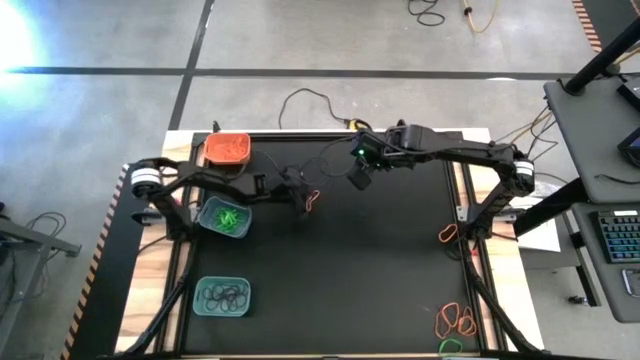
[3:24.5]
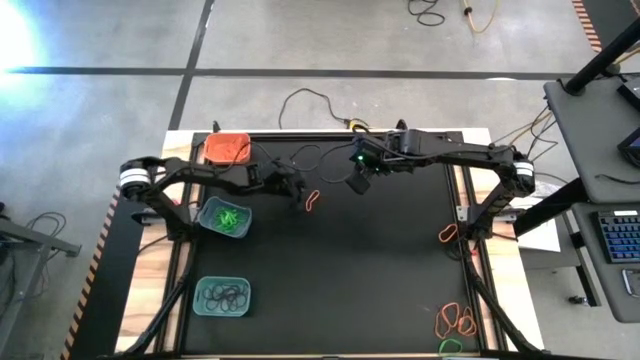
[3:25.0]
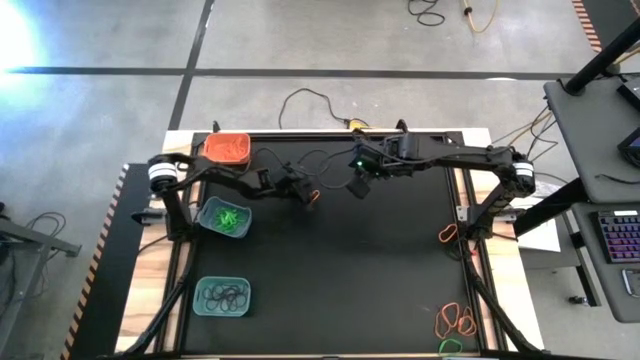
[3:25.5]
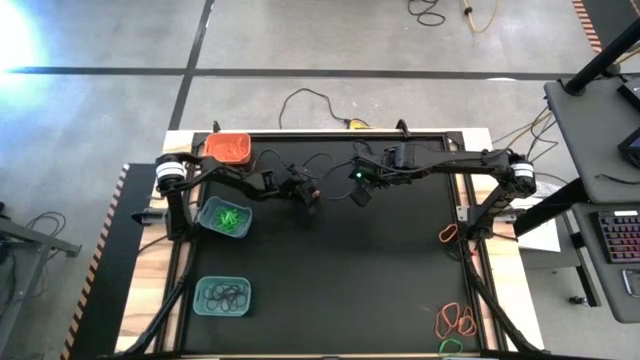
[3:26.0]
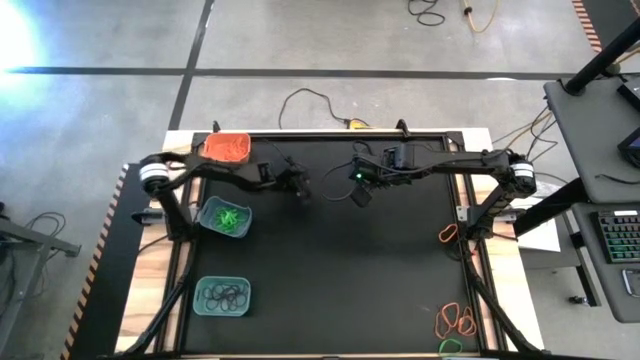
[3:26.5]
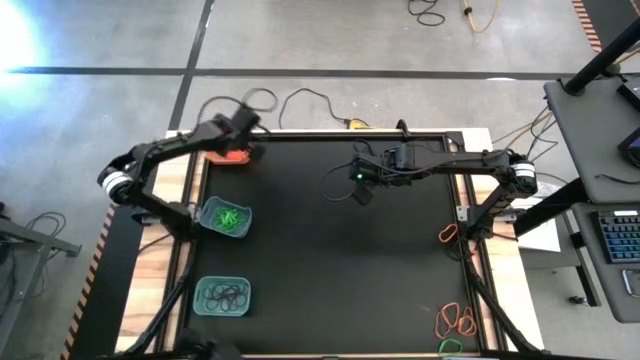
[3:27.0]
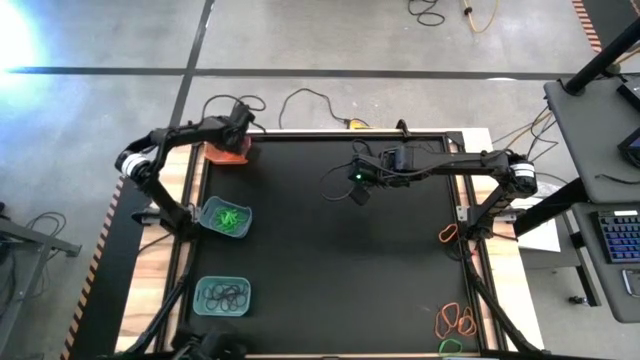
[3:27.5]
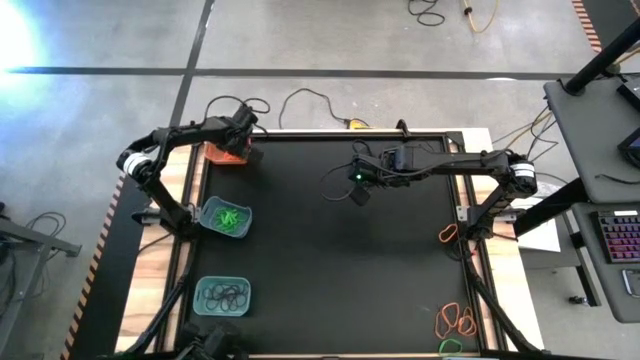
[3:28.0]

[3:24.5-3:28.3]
Task: Sort rubber bands into baskets
Put the orange rubber band into the orange bin

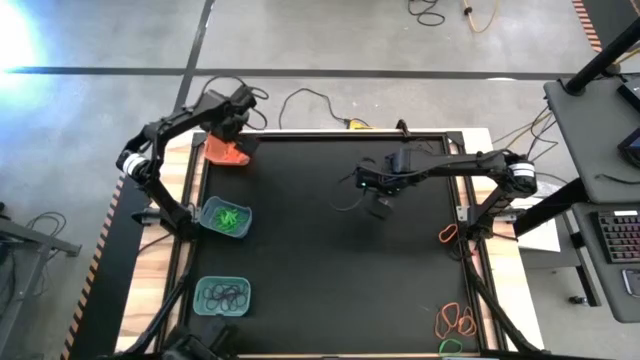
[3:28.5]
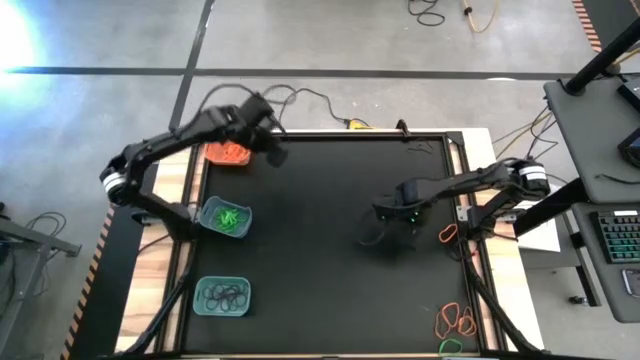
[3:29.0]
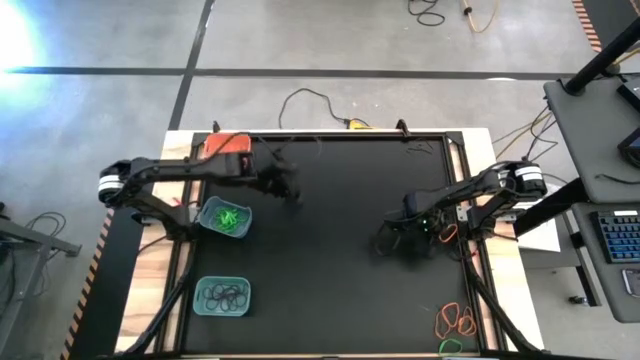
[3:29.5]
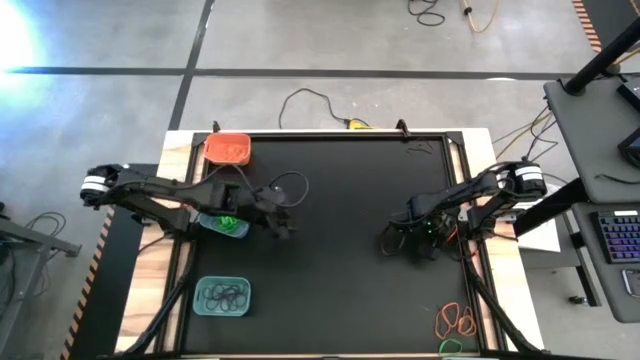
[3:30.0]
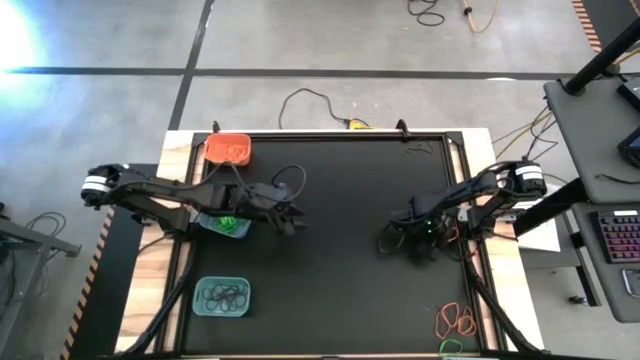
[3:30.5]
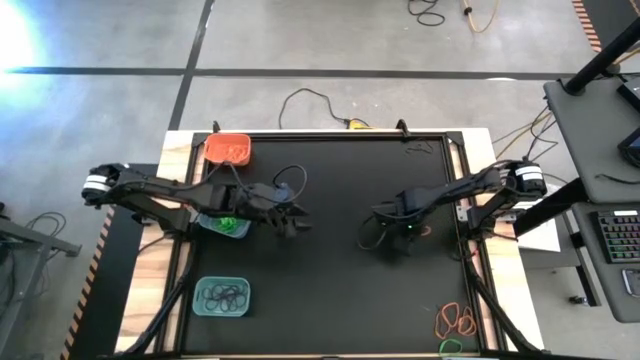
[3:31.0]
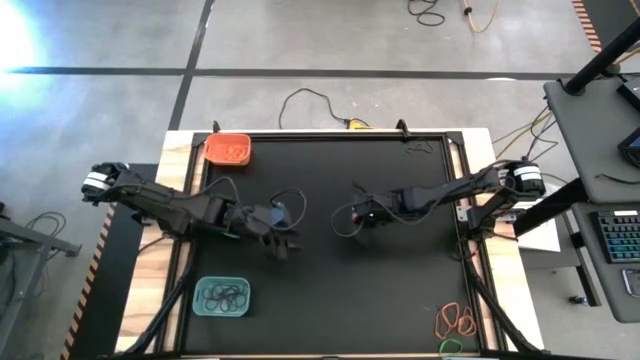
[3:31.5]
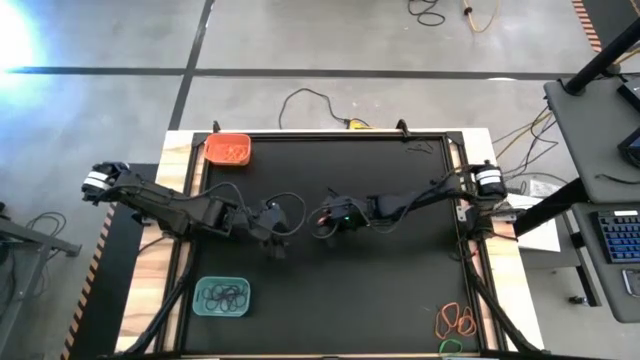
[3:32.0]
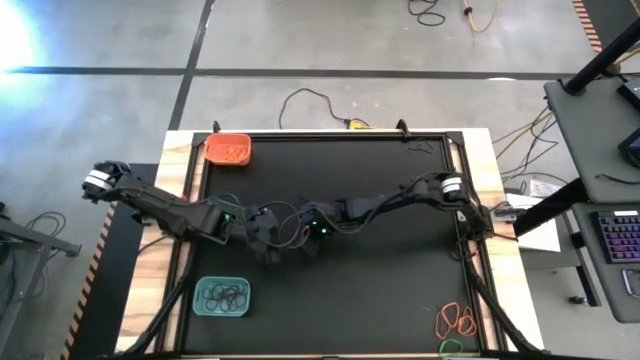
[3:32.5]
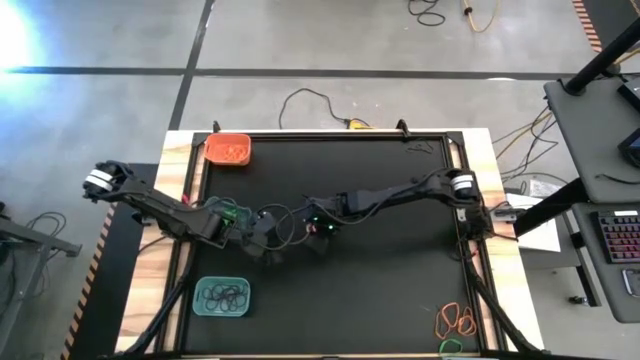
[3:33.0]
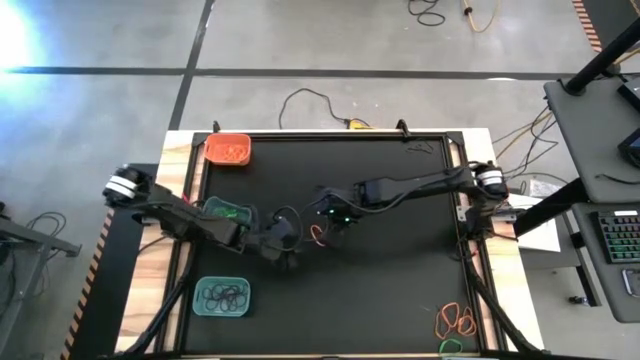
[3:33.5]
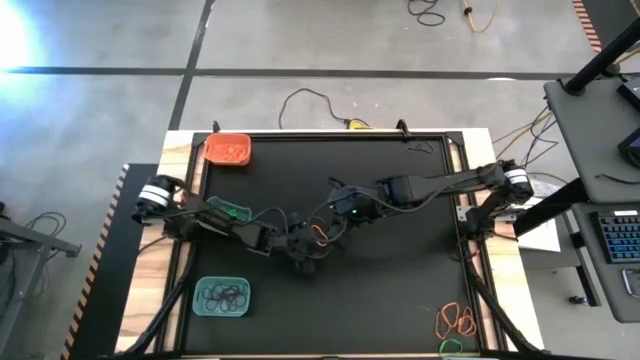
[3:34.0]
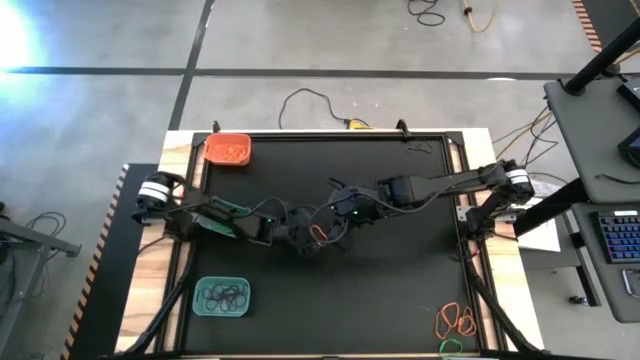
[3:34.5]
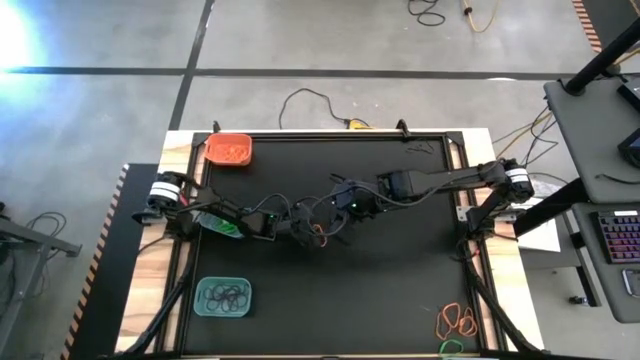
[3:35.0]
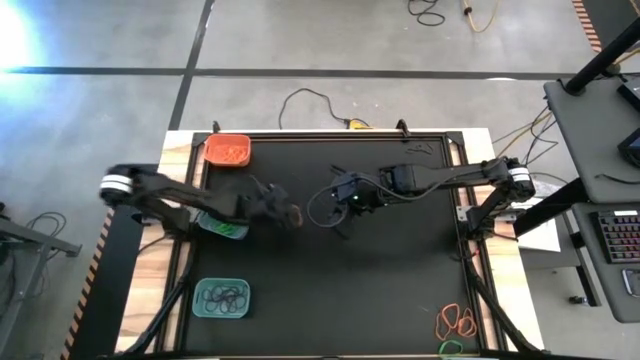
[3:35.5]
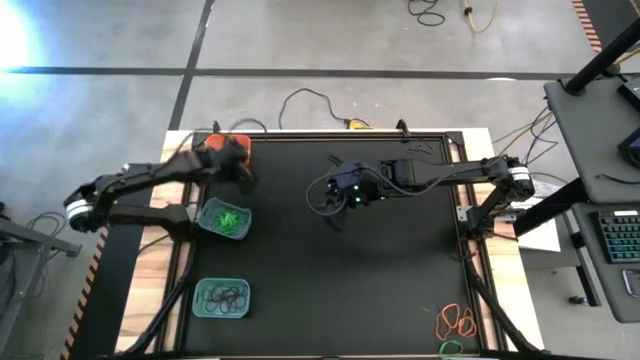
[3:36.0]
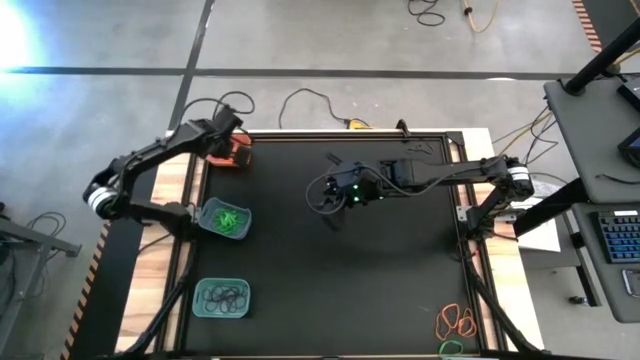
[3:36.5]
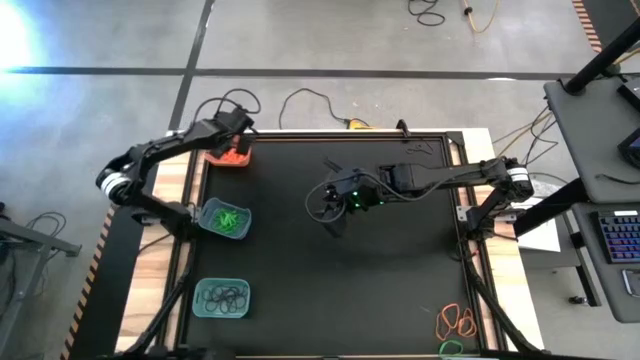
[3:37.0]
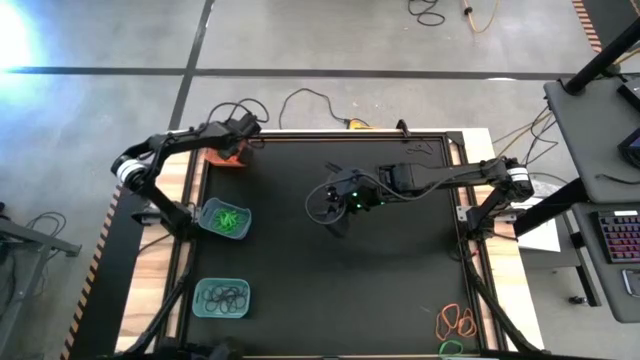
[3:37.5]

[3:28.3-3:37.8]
Put the orange rubber band into the orange bin

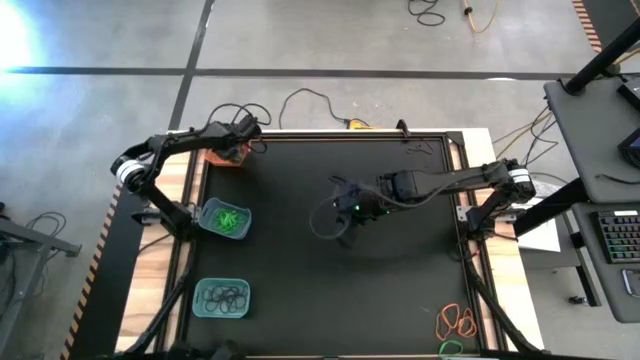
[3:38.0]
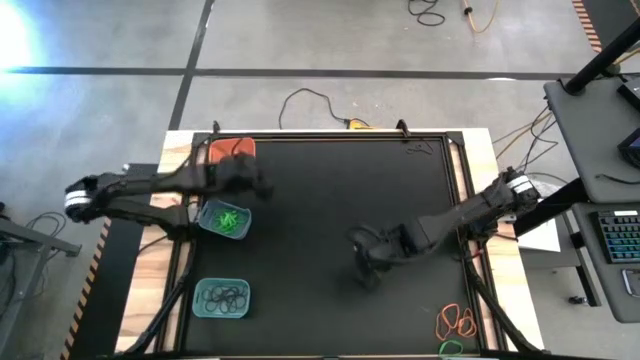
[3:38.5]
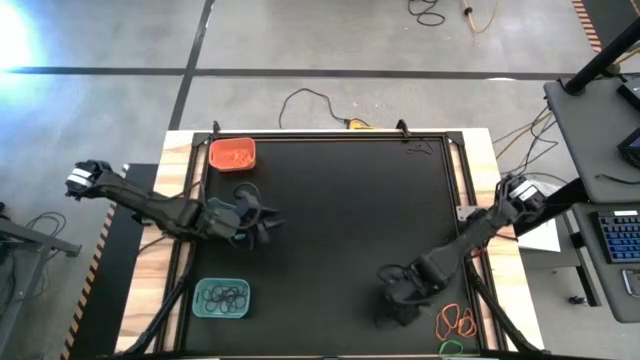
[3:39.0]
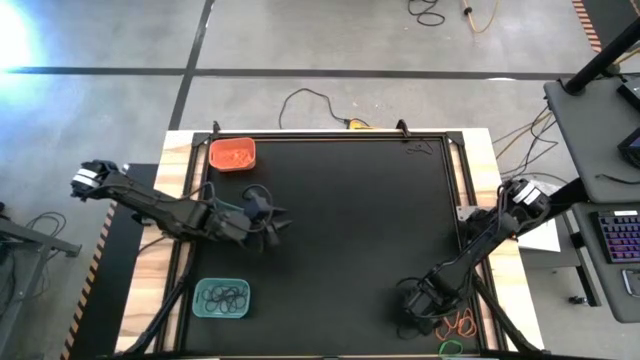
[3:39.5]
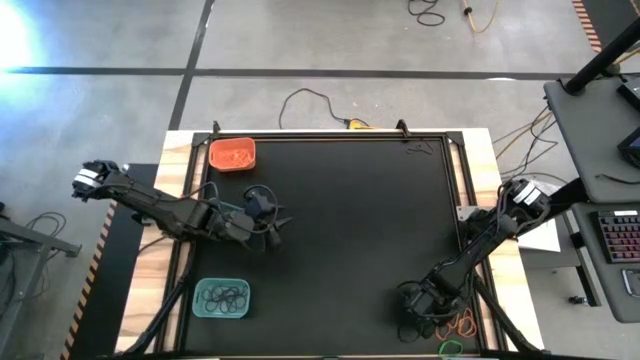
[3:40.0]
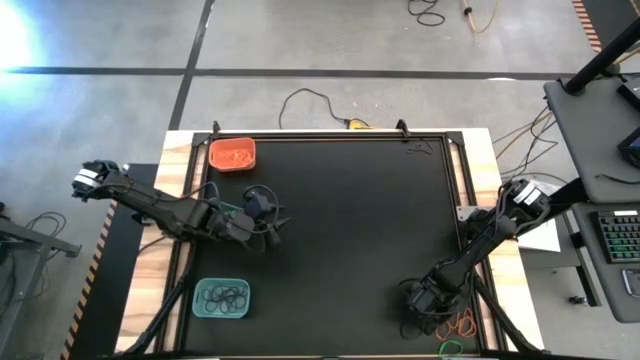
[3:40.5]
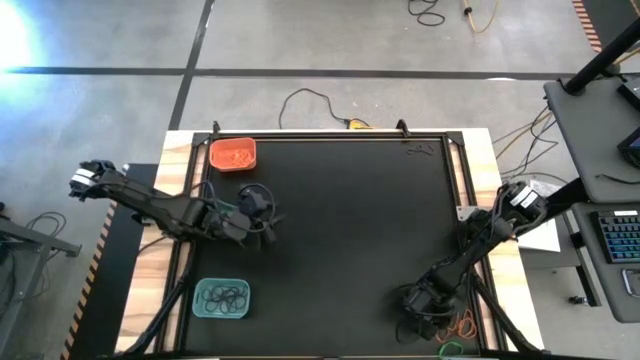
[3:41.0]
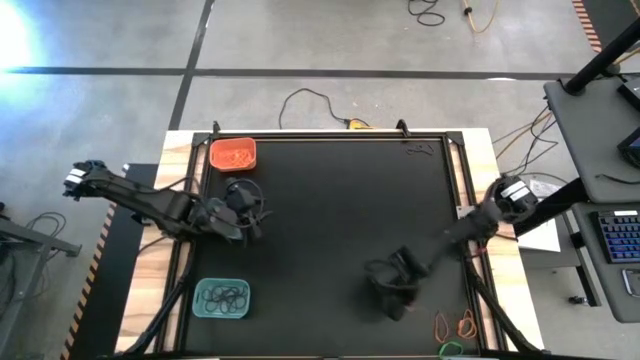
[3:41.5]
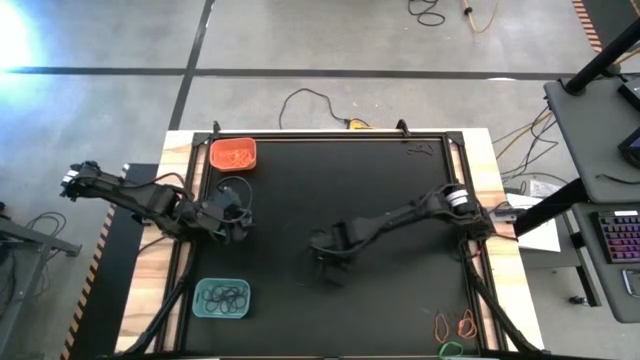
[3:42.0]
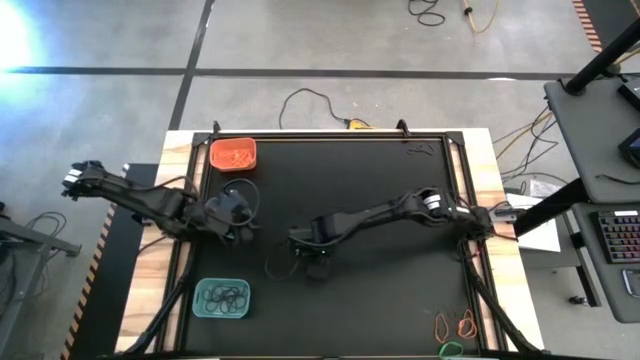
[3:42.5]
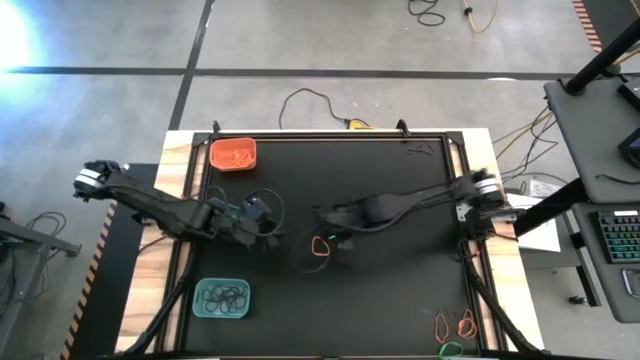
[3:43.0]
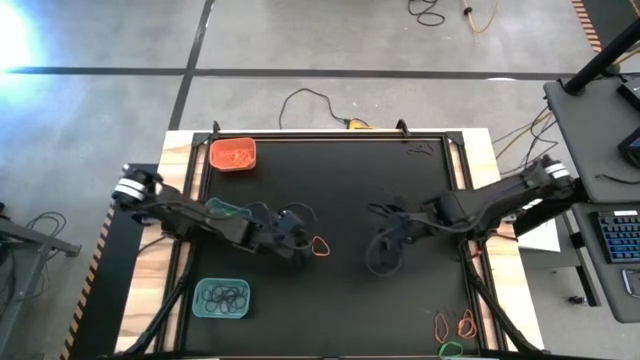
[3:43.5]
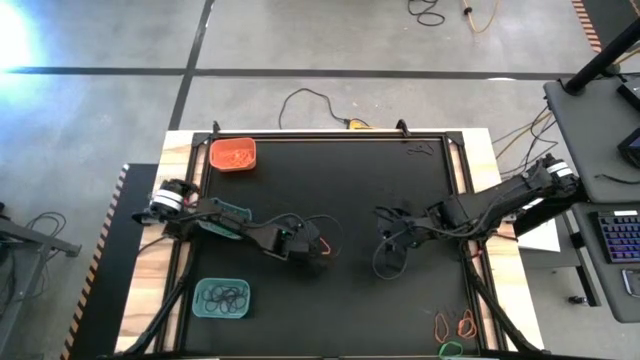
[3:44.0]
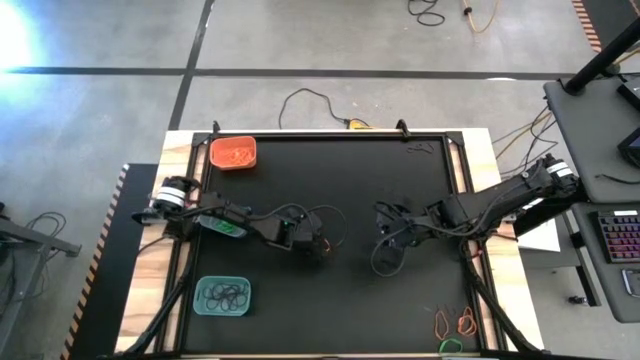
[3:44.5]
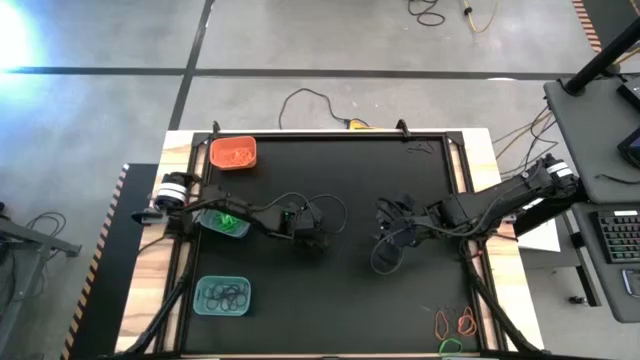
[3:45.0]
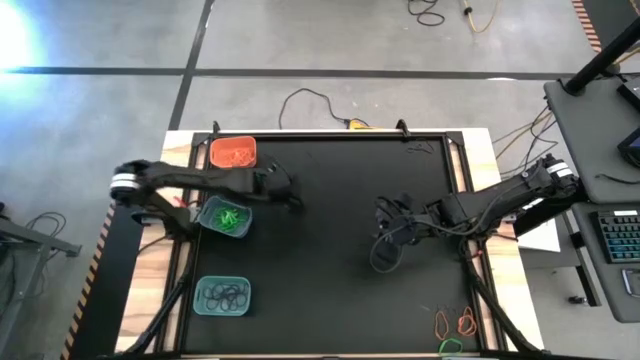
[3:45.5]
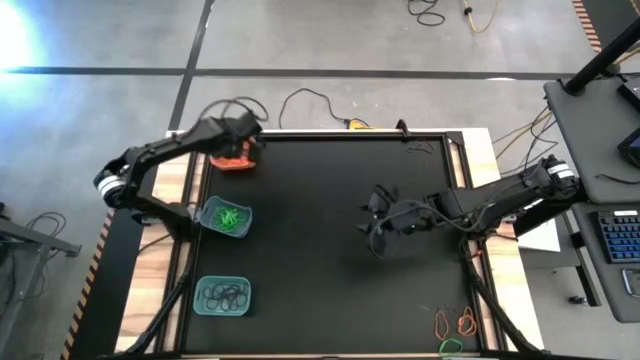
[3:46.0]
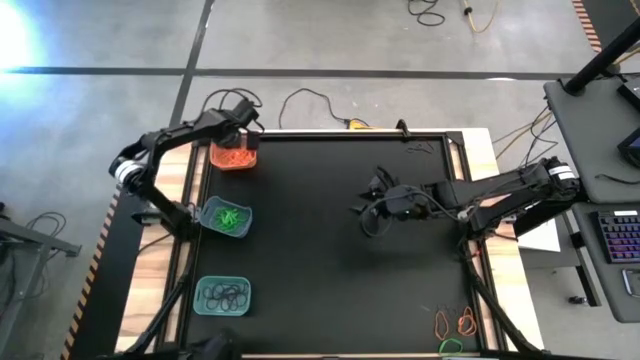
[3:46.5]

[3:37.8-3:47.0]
Put the orange rubber band into the orange bin
